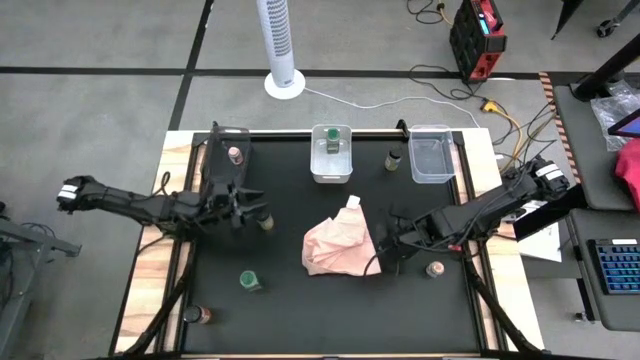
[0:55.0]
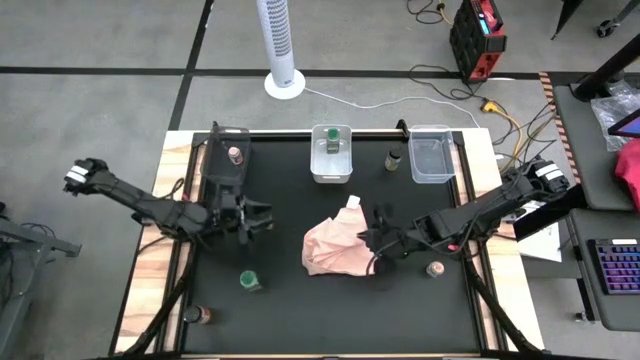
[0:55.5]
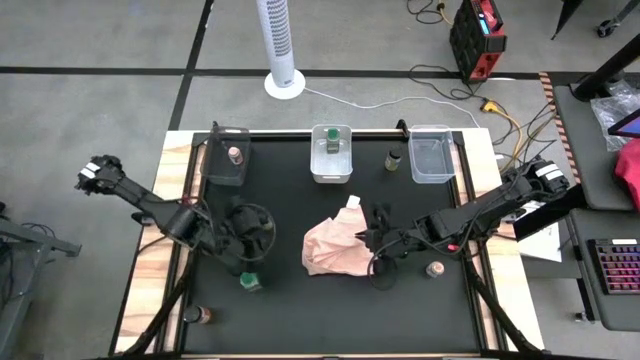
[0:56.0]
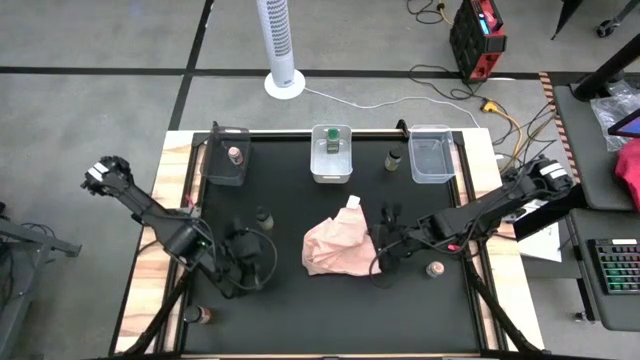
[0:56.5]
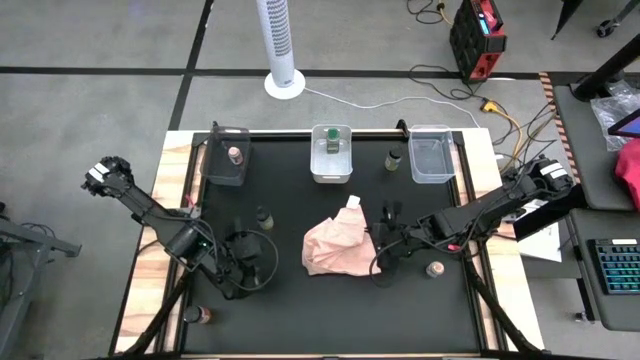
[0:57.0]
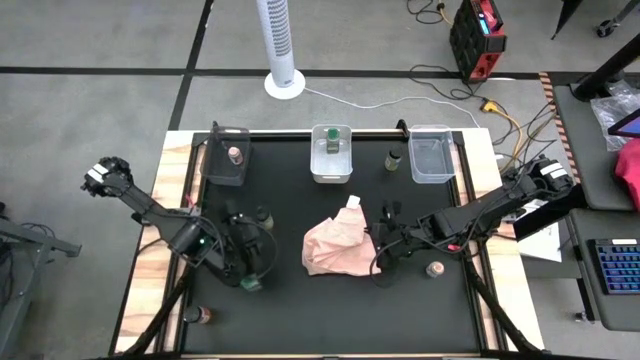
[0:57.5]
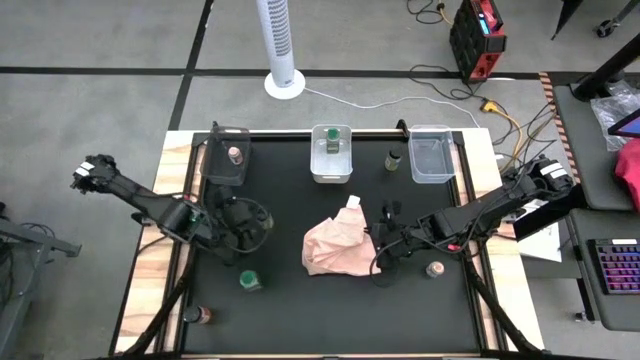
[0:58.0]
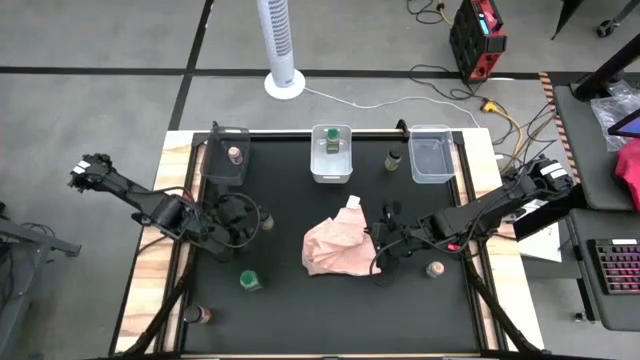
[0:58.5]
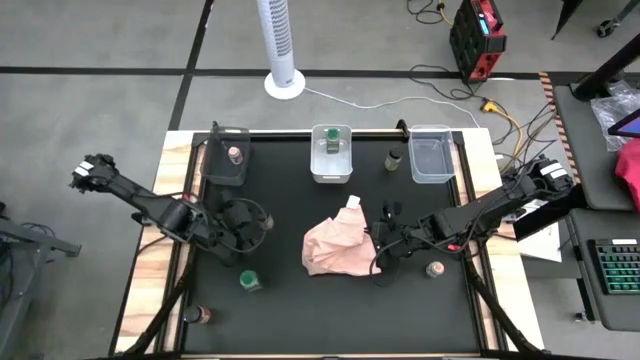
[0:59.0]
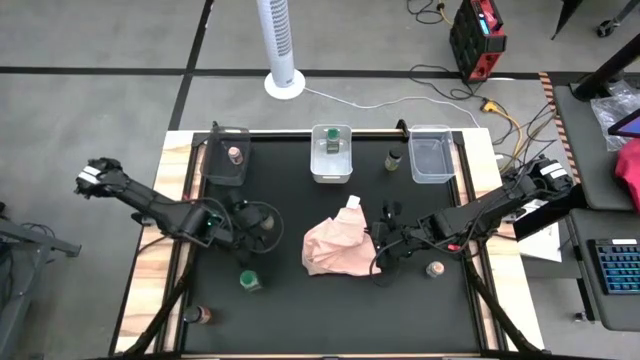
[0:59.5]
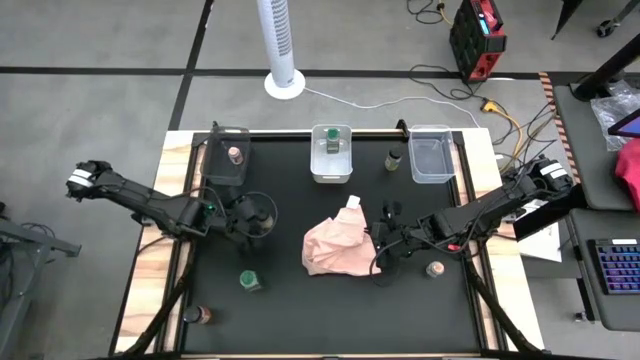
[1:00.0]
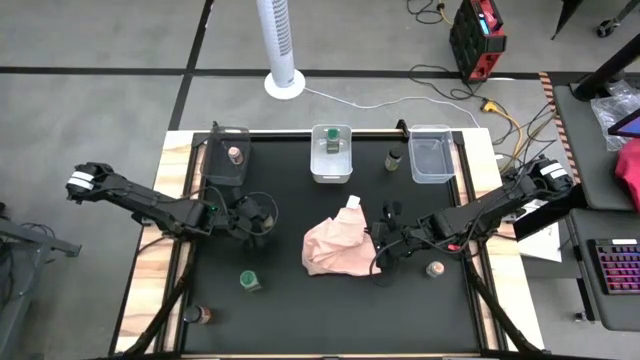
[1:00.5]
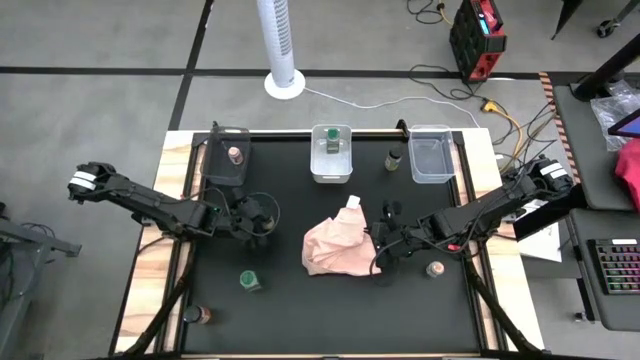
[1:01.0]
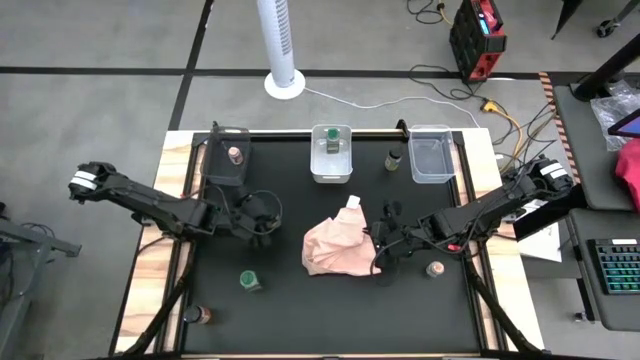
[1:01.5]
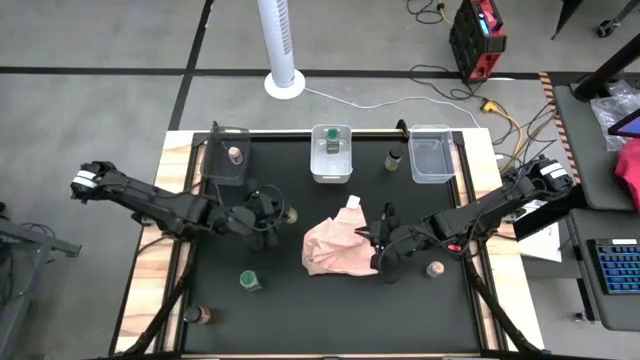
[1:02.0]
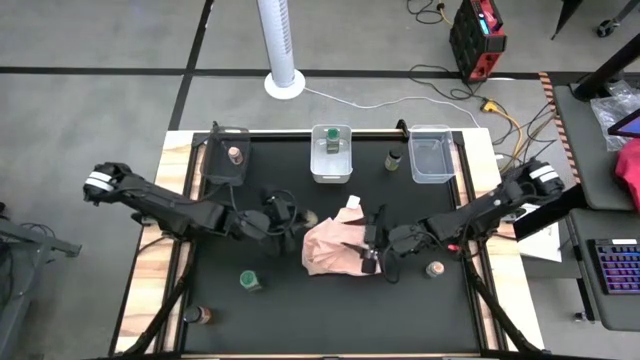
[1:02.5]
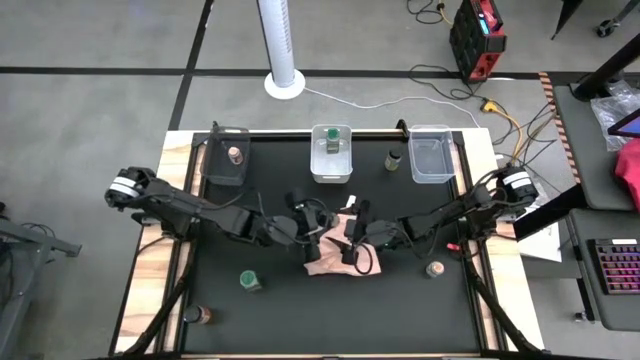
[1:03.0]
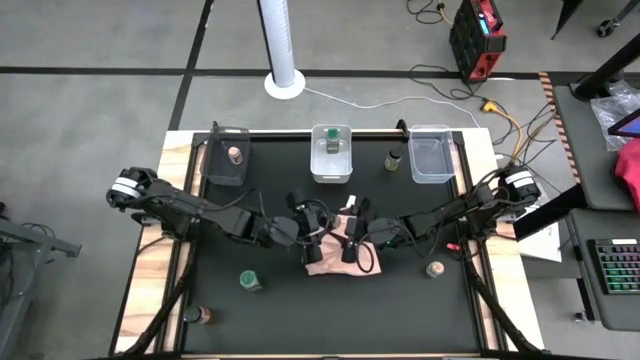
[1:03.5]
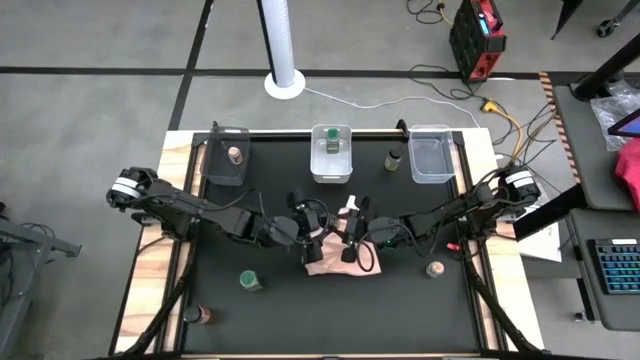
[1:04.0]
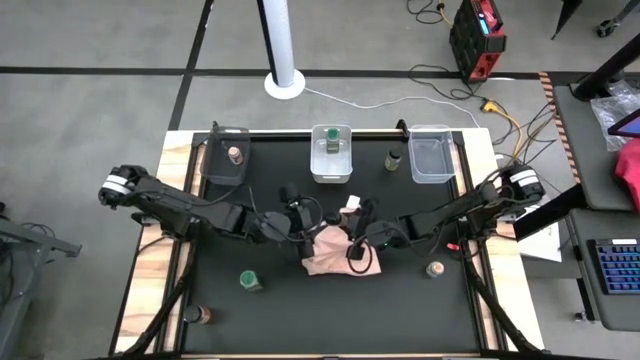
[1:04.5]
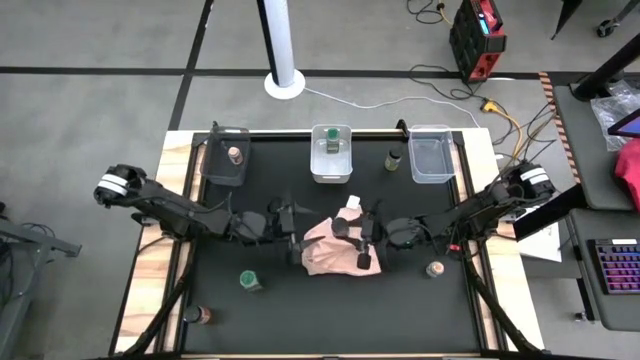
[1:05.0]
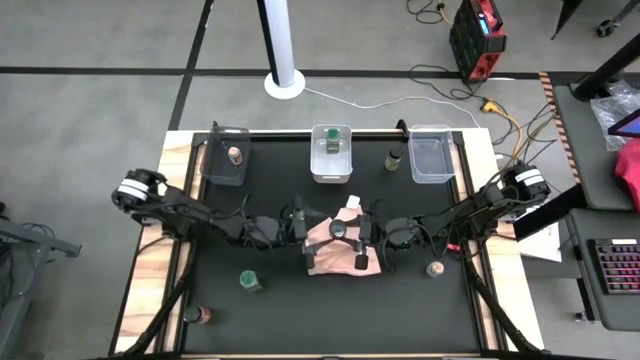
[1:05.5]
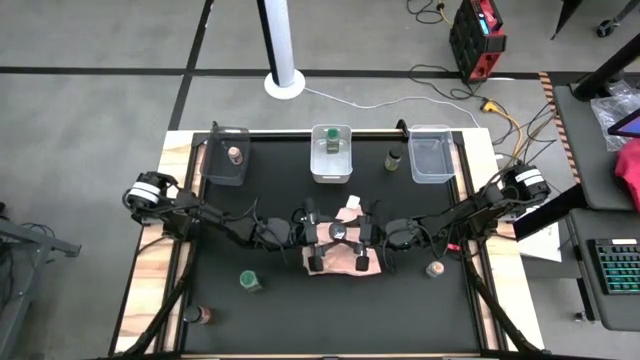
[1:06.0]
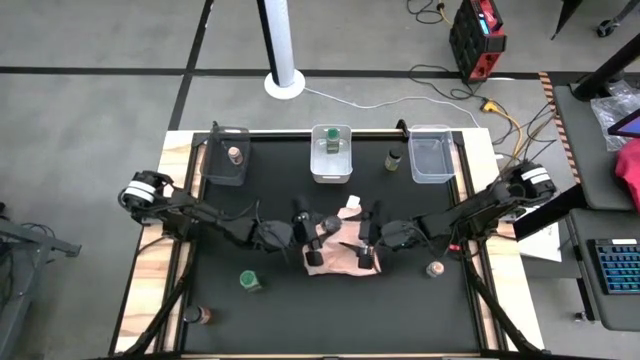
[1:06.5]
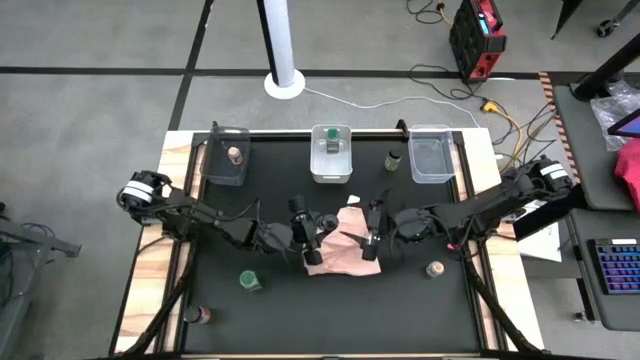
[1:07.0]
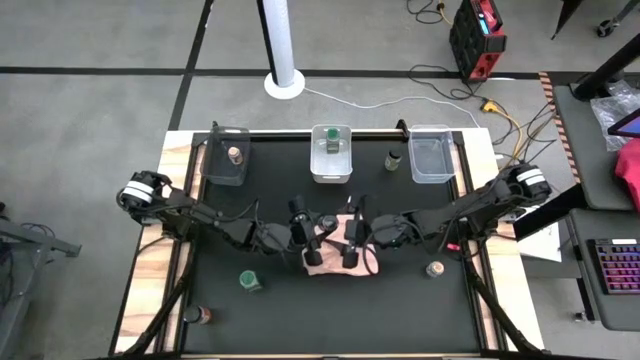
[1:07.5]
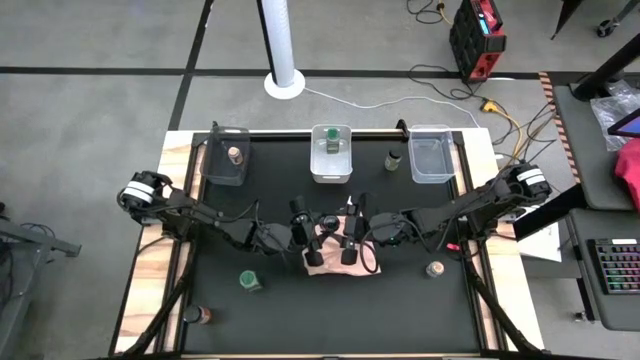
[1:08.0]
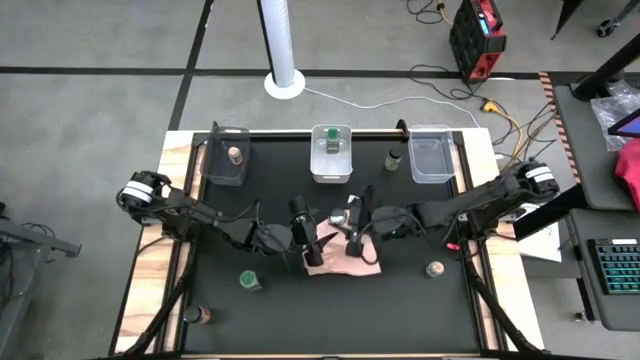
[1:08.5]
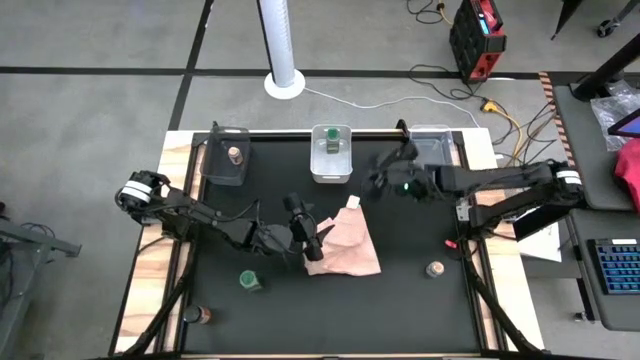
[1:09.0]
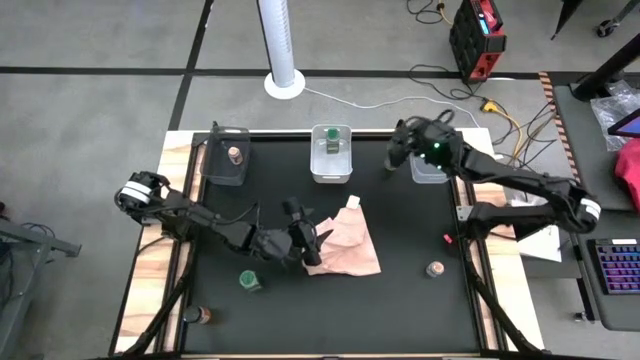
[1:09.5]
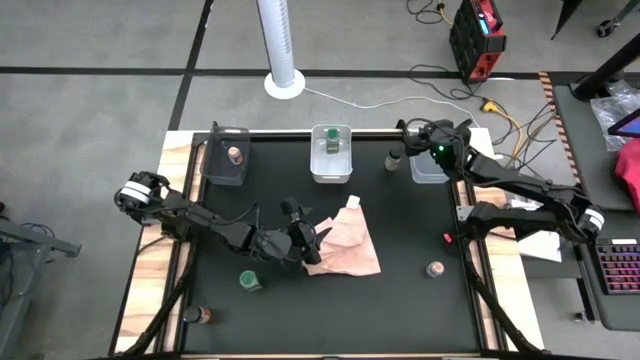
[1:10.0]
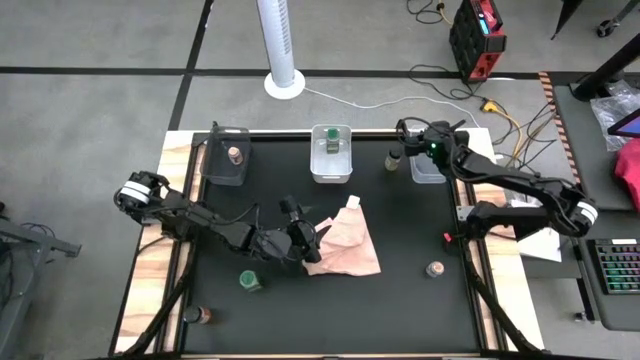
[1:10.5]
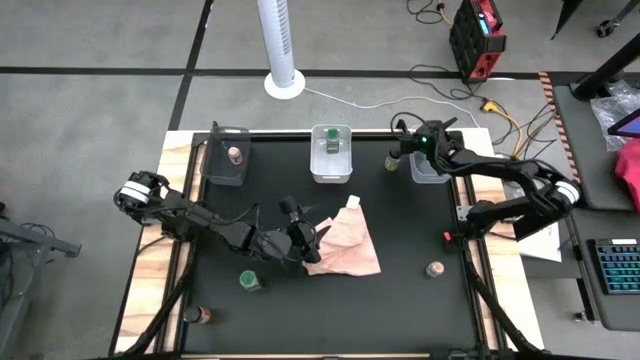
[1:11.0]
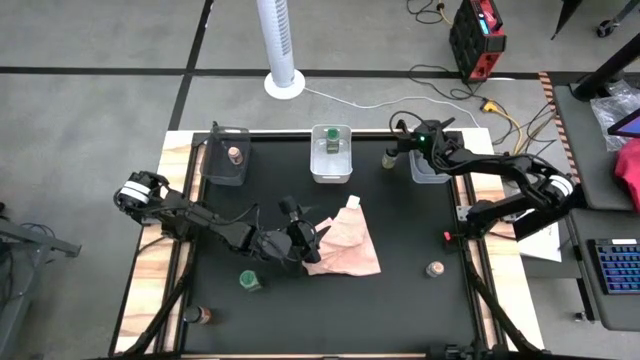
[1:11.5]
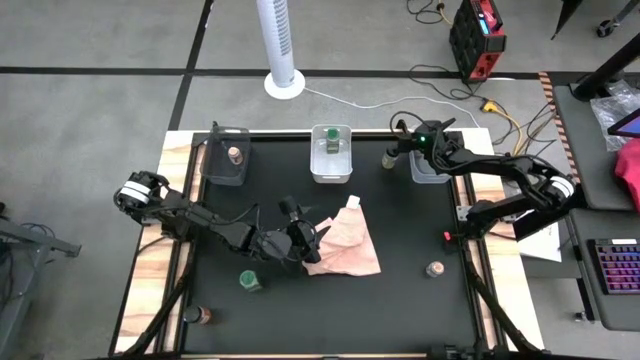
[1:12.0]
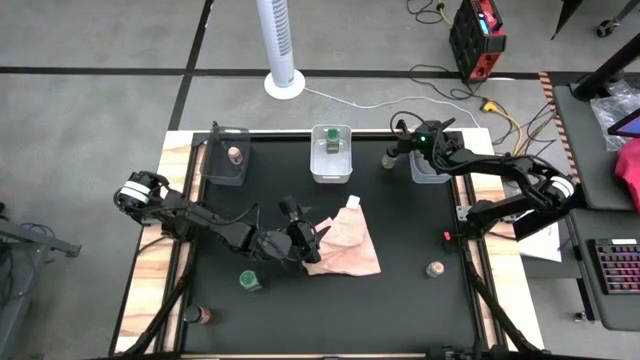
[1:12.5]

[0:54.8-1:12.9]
Task: Sort spices by type
Put the left black spice bottle into the transparent bin

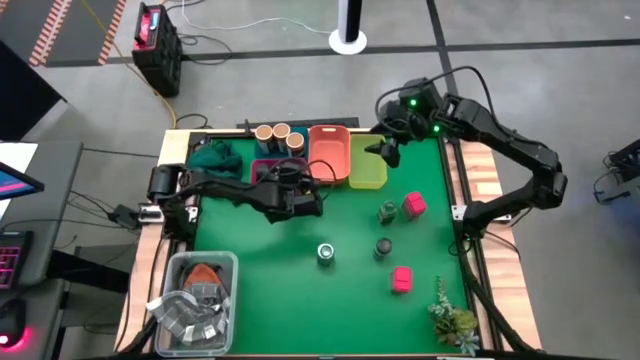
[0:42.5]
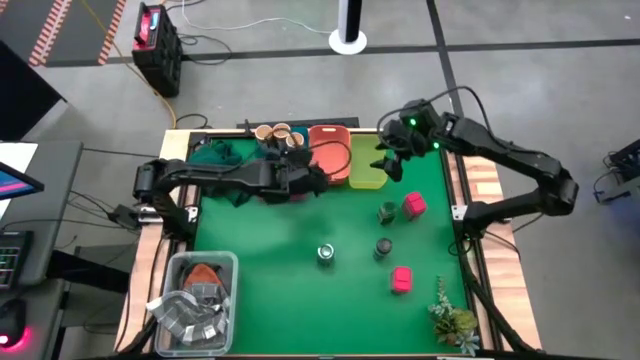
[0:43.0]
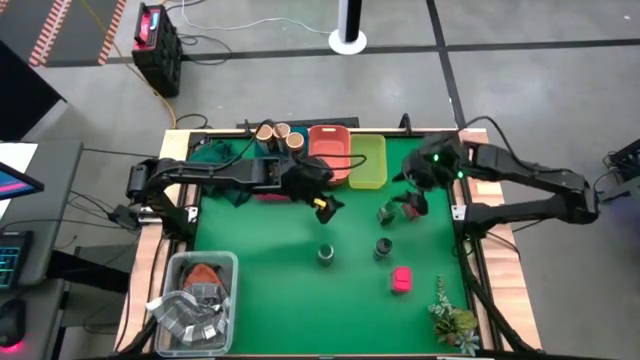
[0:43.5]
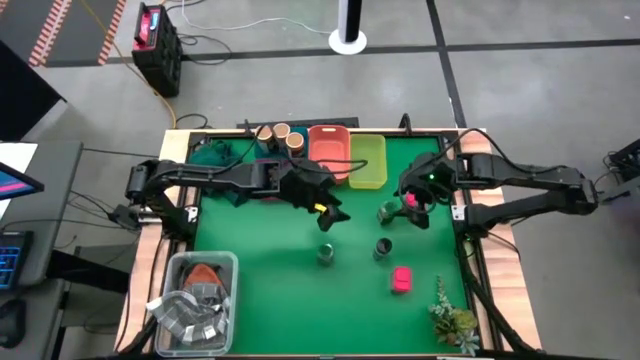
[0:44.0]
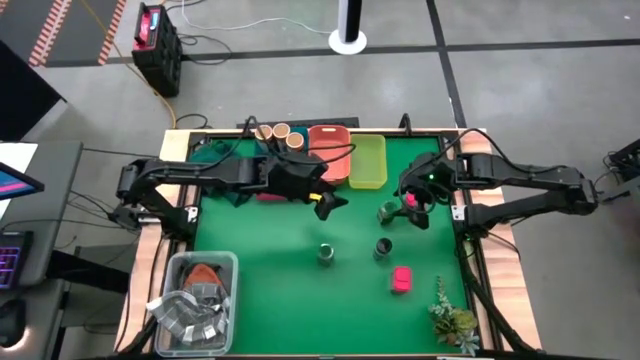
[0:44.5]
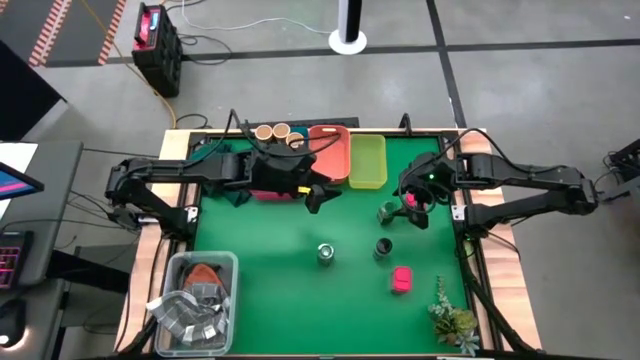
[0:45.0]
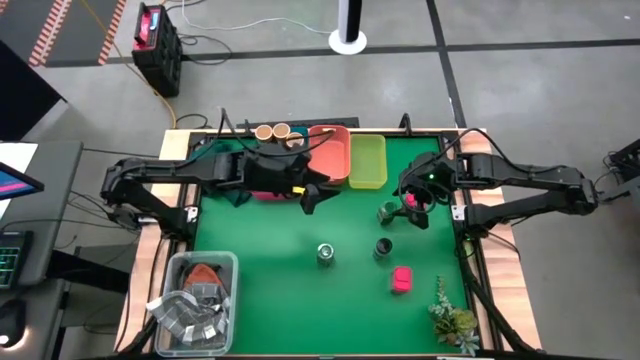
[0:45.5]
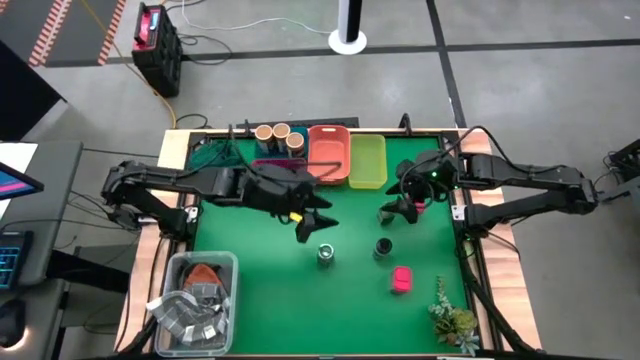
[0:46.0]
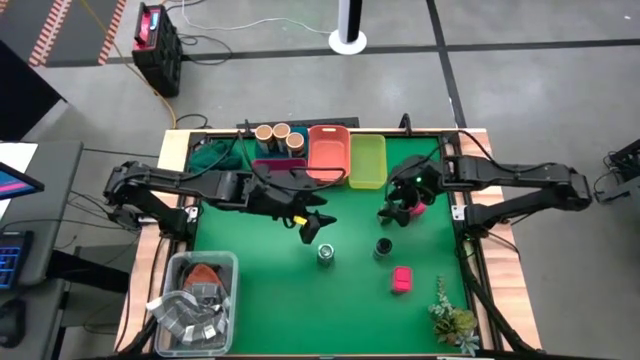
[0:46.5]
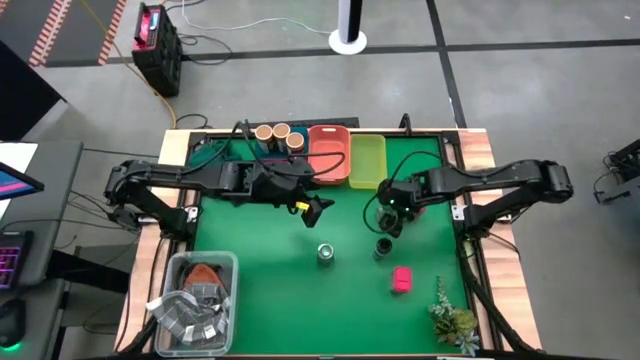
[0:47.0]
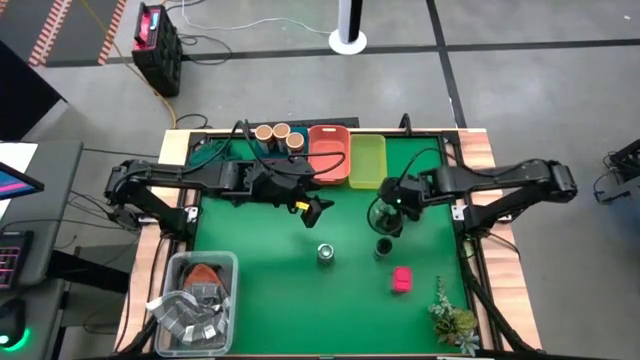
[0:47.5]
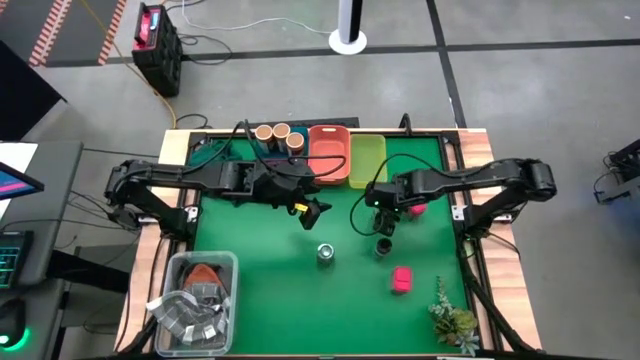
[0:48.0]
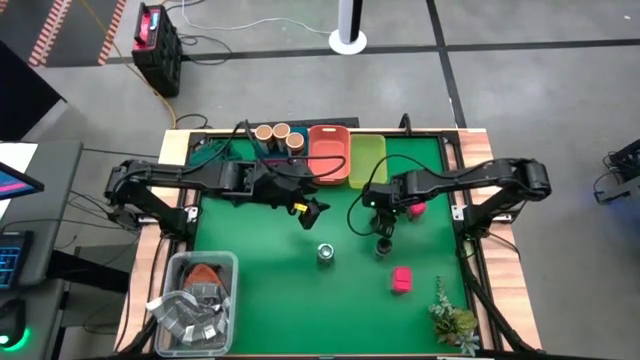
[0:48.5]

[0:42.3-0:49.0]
Task: Sort spices by type
Put the top green seasoning bottle into the orange bin
